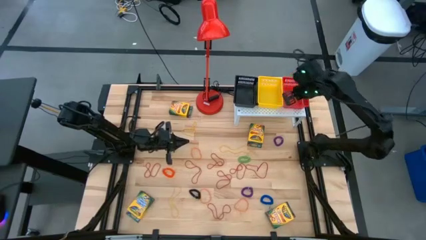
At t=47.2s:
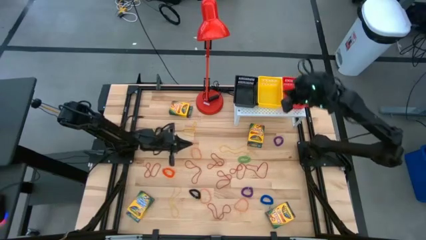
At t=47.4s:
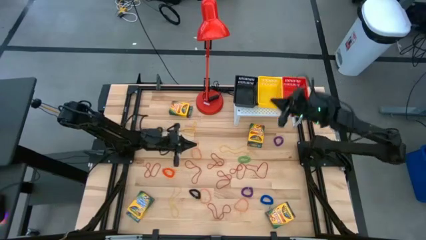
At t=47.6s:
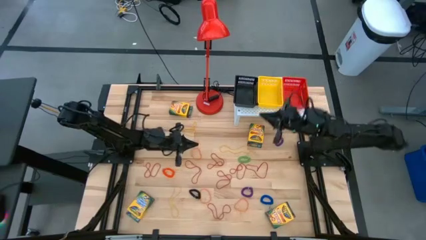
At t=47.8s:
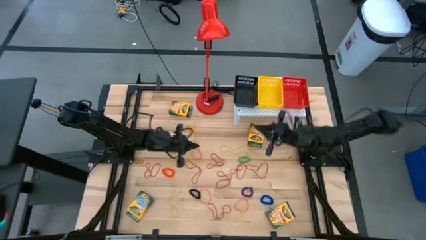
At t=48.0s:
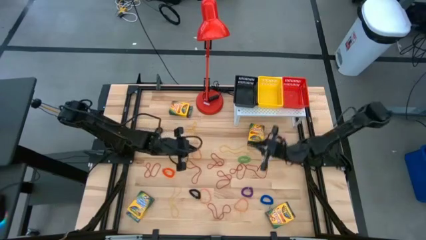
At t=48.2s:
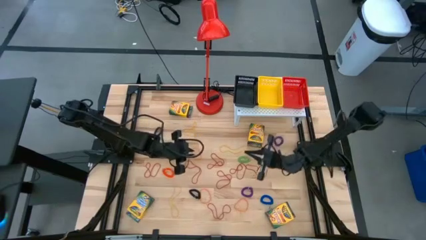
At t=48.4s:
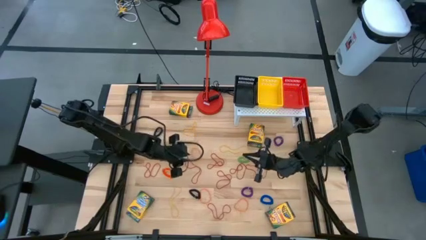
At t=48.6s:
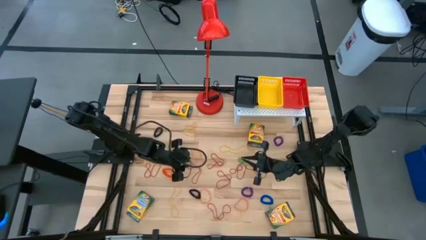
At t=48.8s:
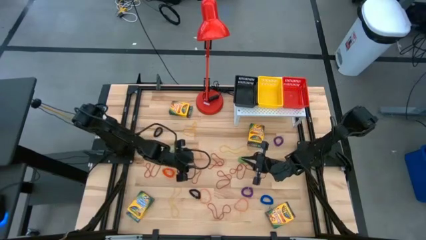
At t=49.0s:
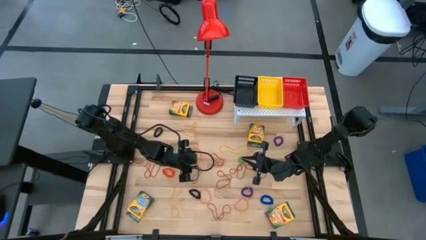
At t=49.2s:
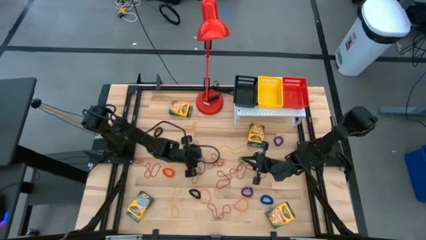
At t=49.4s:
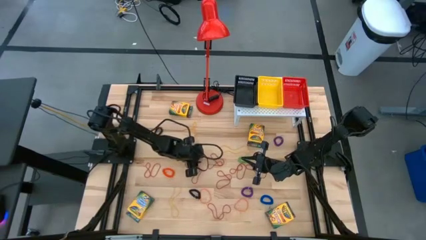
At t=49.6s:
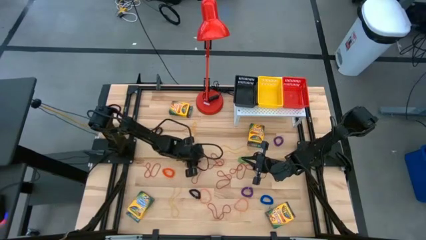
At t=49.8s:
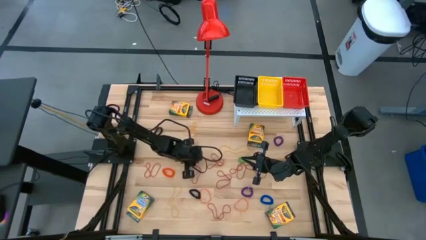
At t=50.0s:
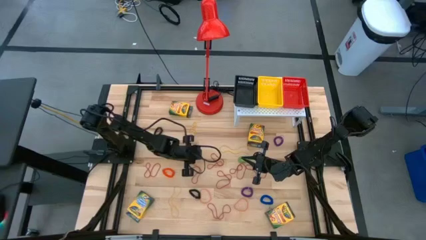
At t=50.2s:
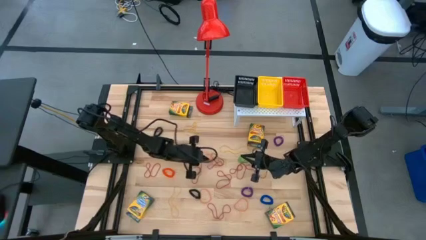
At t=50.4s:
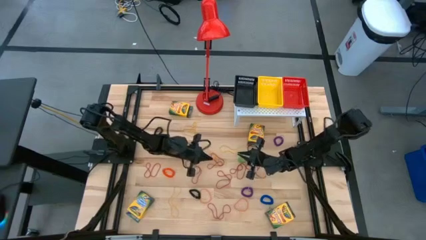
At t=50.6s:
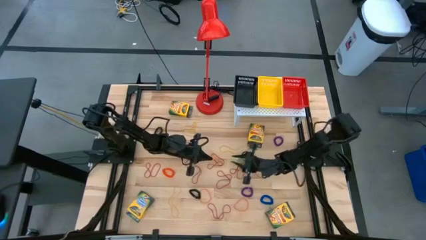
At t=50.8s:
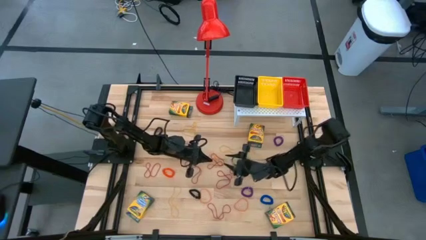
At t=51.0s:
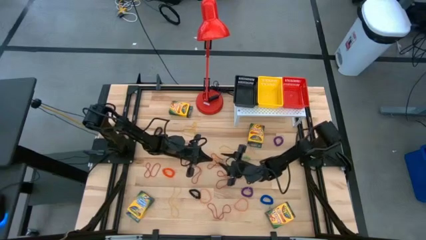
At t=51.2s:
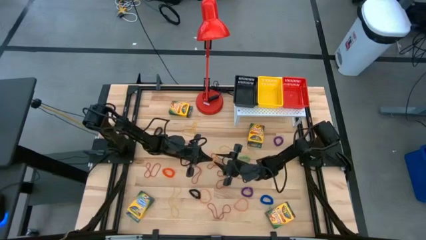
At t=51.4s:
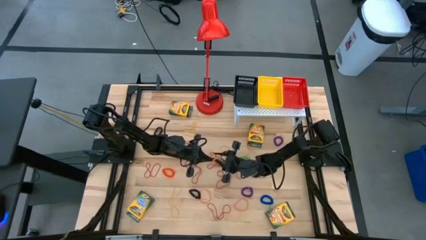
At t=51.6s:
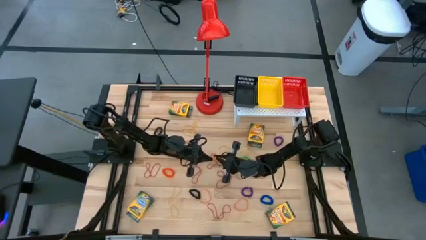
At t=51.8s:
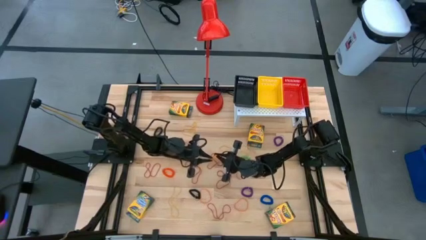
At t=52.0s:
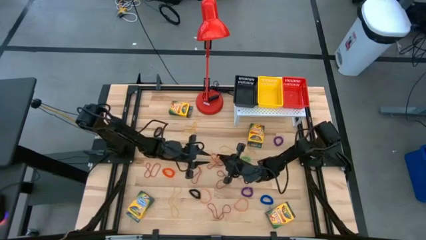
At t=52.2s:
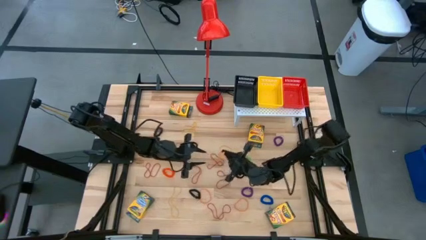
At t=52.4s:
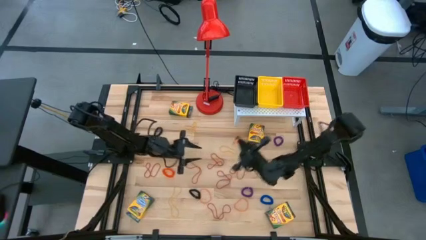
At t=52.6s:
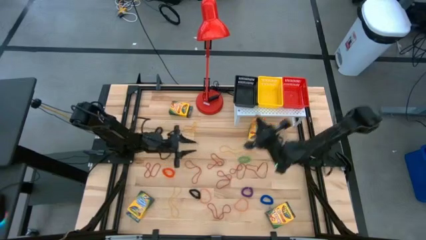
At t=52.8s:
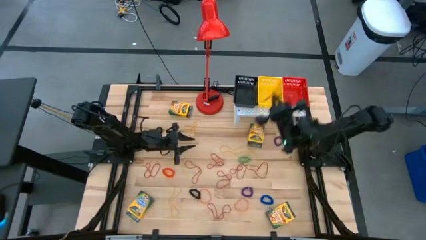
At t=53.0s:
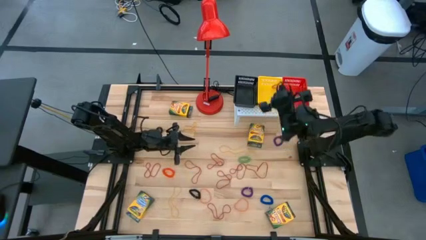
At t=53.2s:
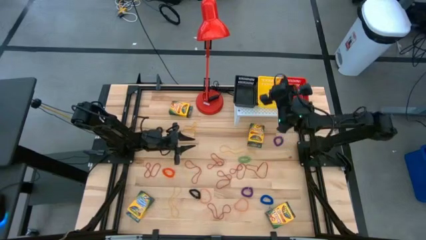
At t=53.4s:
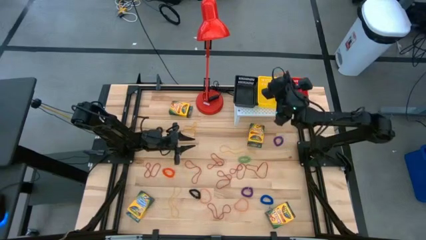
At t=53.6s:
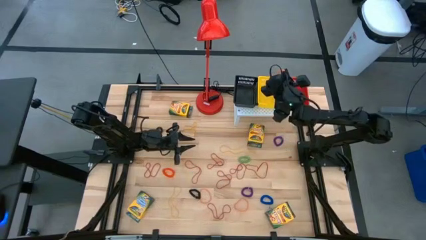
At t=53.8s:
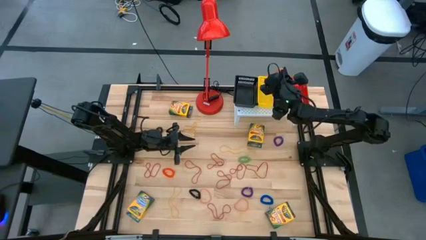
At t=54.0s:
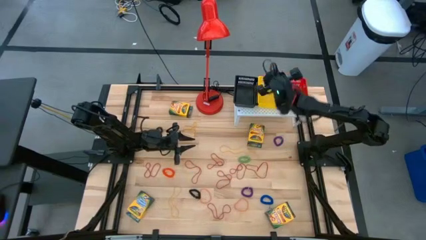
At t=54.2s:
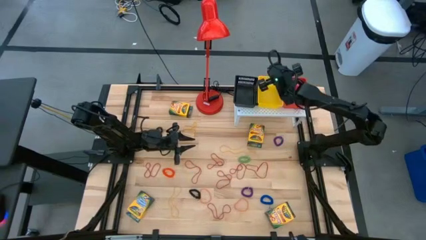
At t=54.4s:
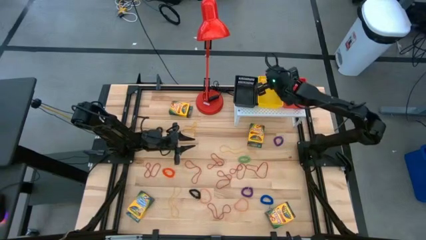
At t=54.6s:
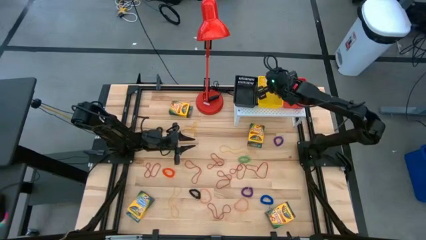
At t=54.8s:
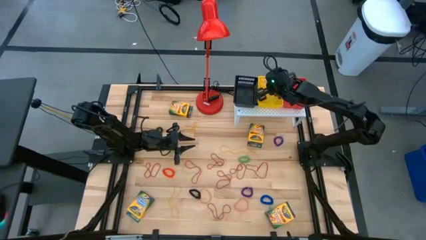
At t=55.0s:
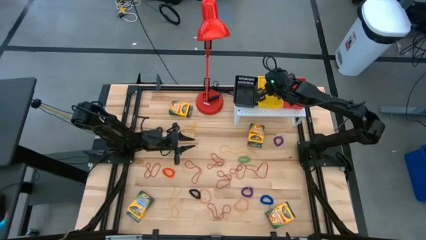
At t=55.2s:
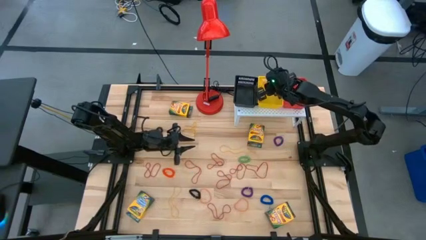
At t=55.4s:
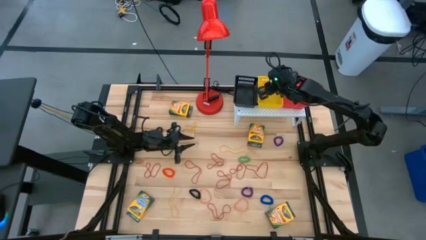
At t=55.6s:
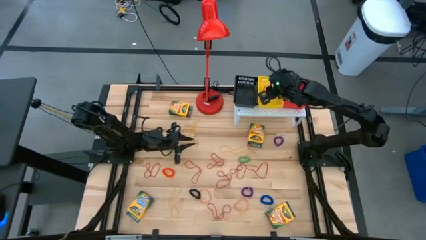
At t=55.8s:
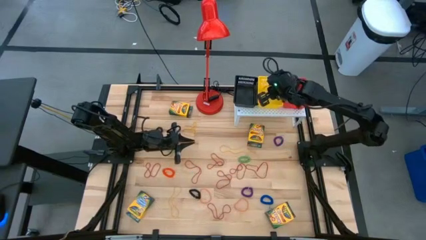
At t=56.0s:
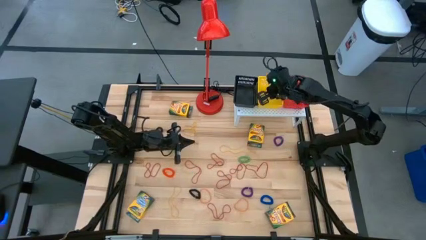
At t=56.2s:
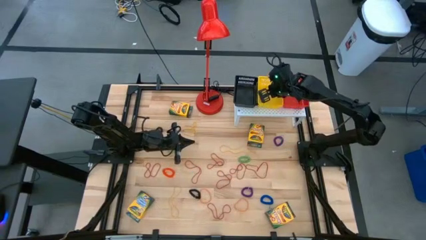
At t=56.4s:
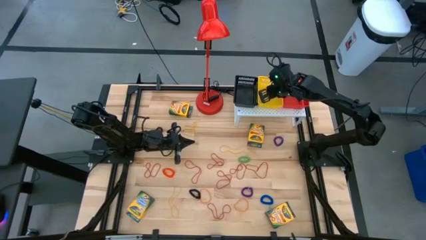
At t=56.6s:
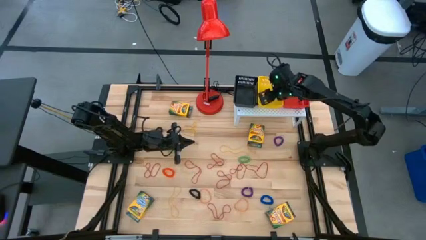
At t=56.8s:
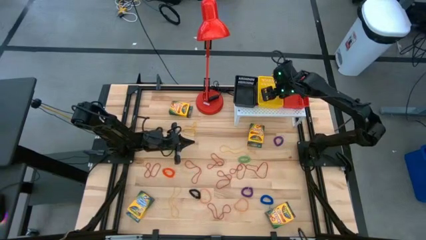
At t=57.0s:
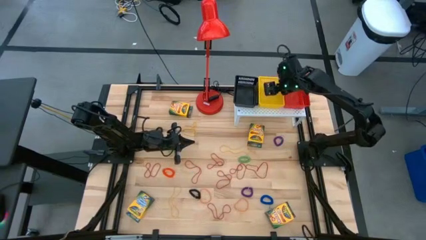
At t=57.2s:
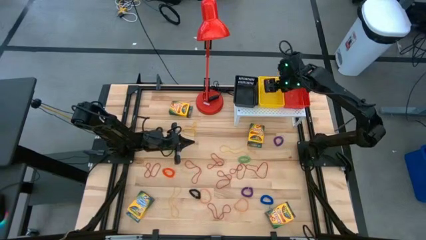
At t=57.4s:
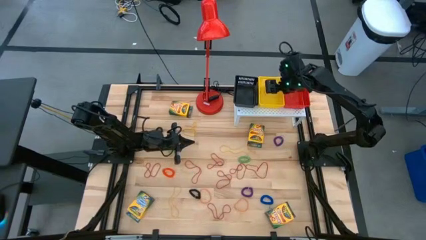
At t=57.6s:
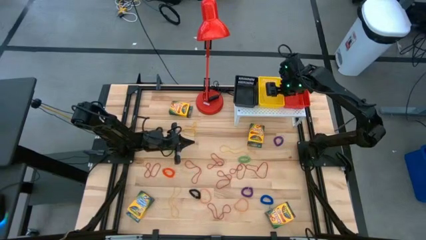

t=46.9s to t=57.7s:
Task: Pick & Place Office Desk Supplies
Put the top left orange rubber band into the yellow bin

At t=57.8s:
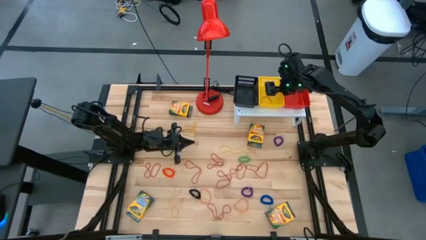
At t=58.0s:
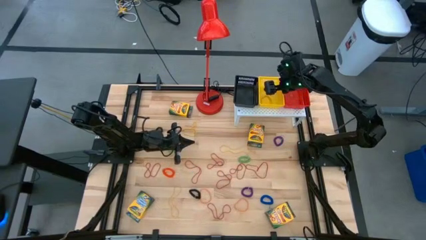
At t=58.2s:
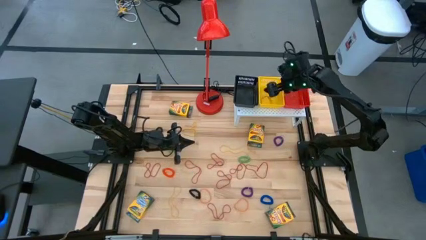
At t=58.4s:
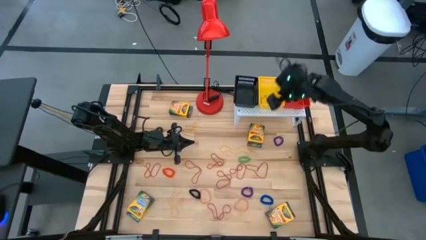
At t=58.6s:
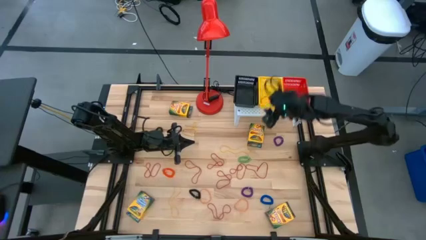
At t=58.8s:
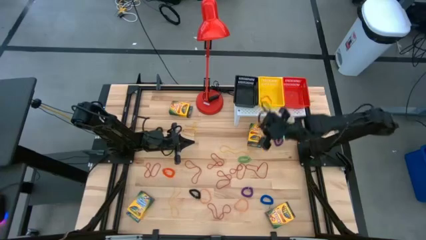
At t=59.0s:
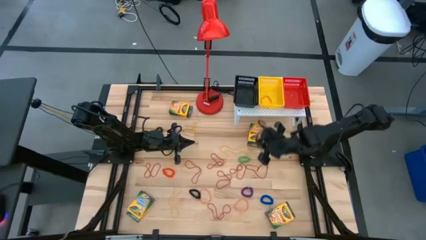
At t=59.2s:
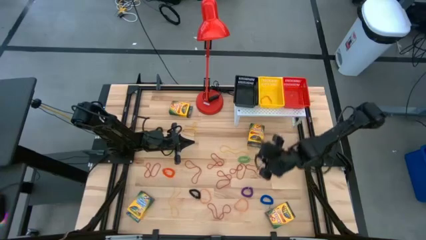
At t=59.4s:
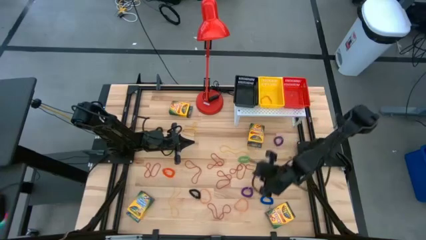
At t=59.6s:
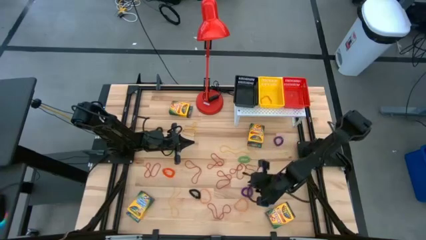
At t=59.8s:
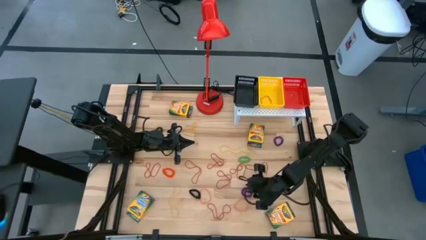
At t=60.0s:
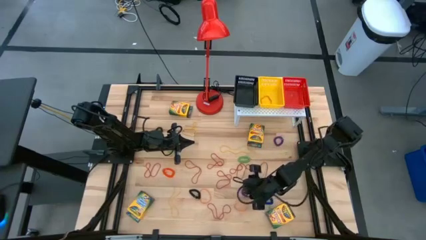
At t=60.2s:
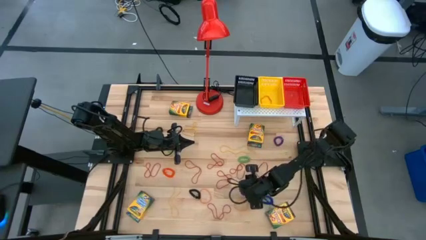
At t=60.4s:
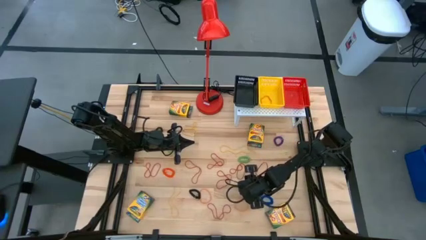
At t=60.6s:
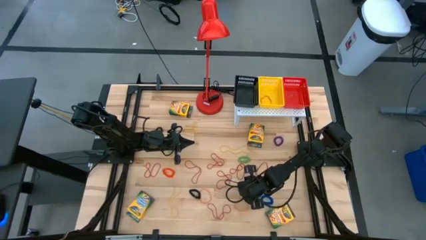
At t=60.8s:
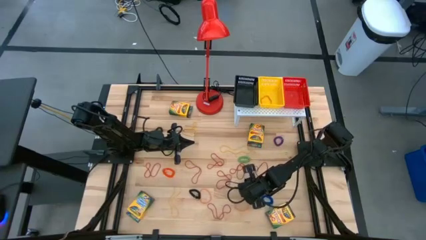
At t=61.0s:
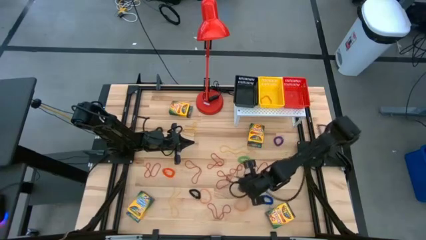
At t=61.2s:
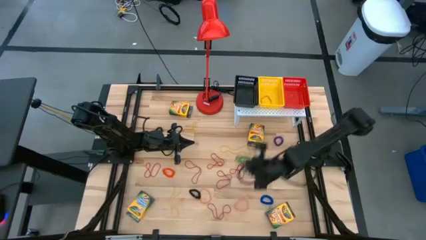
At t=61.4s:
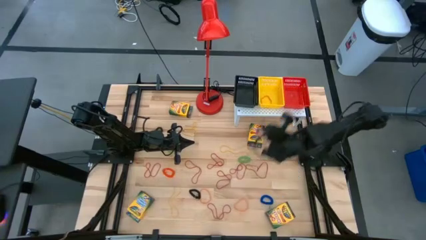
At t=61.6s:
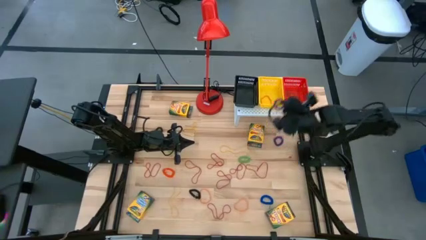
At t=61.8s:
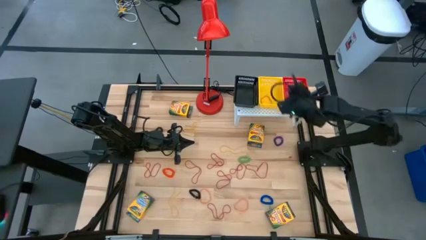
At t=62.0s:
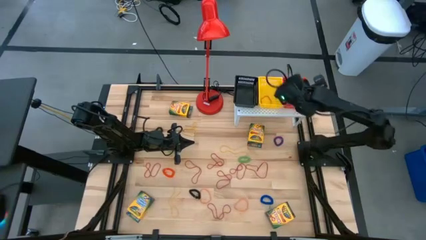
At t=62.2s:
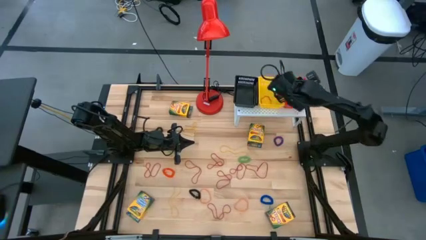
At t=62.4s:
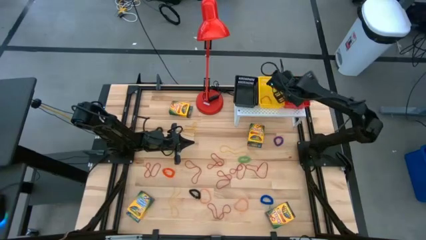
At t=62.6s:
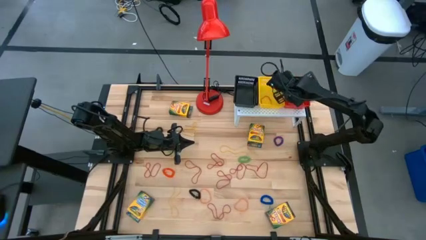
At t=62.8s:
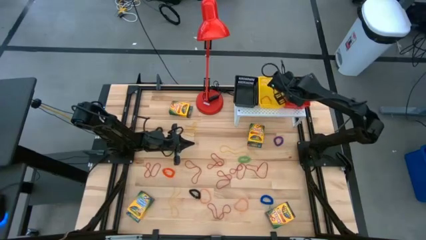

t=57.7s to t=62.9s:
Put the bottom violet spring keychain into the red bin
